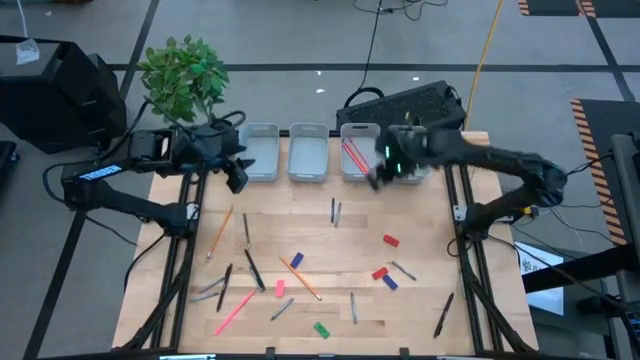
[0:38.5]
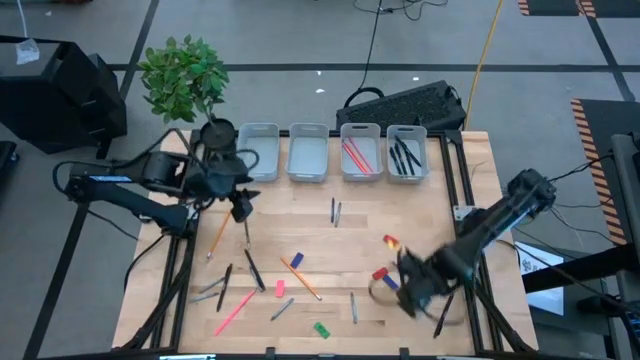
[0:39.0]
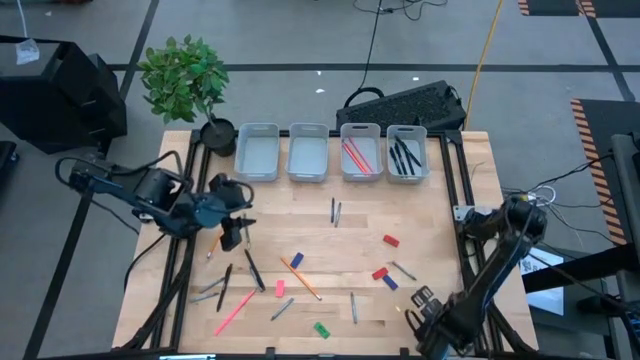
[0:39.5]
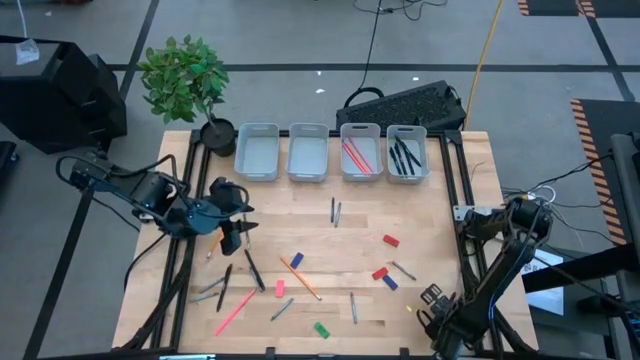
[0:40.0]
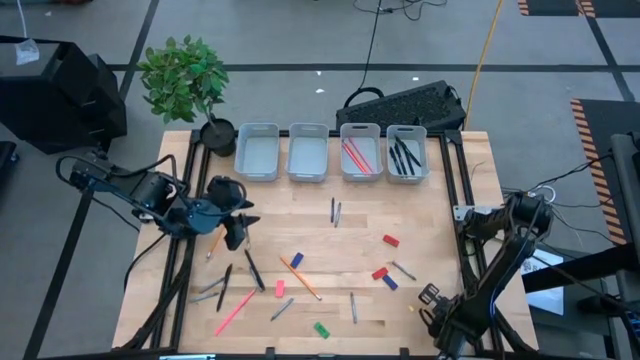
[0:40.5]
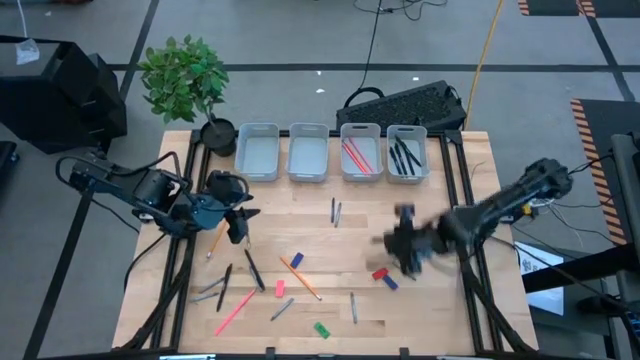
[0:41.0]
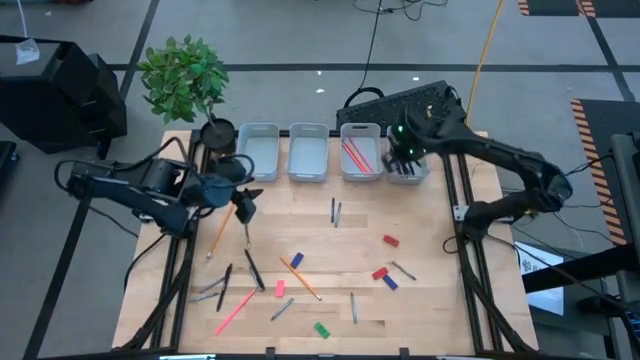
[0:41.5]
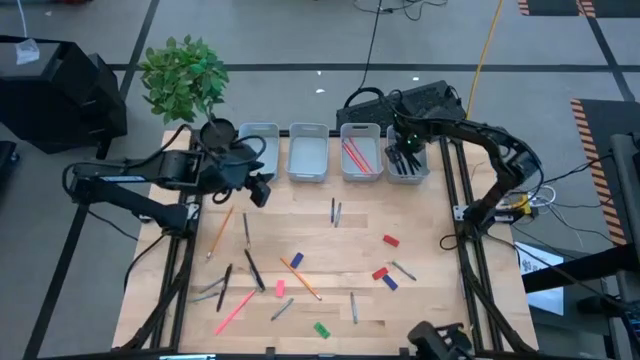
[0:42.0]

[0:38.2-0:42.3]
Task: Sort crayons/erasers/pens/pencils in bins
Put the black pen into the top right gray bin

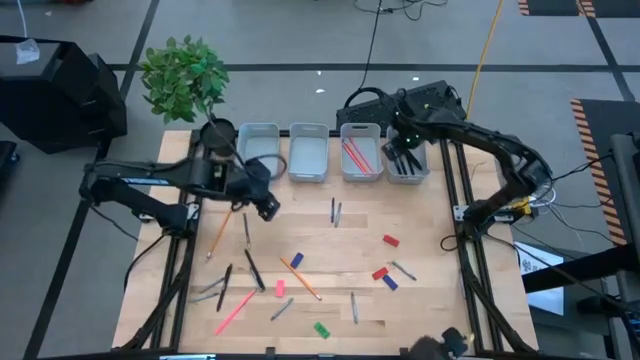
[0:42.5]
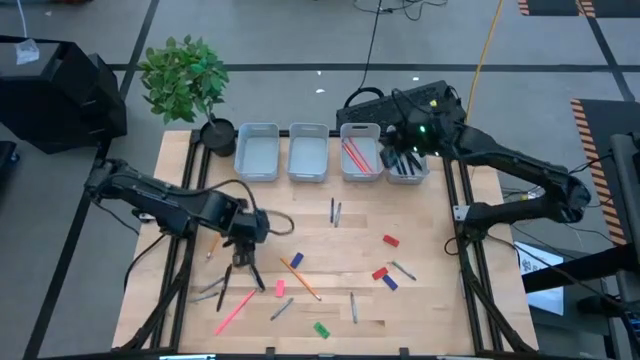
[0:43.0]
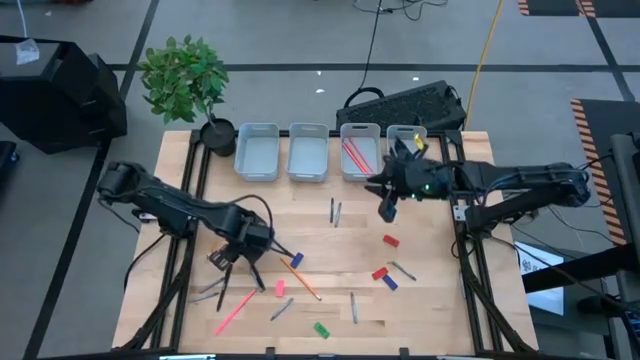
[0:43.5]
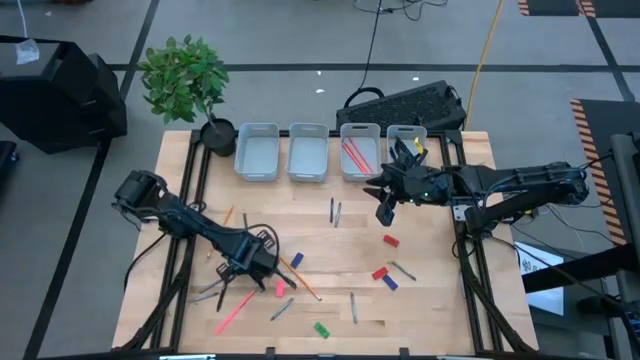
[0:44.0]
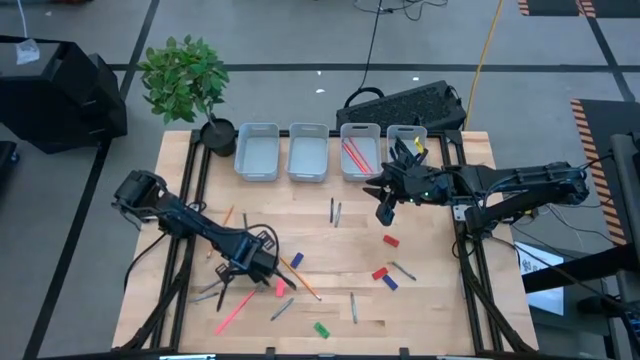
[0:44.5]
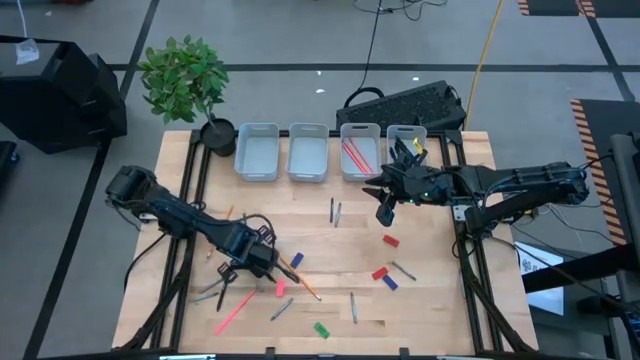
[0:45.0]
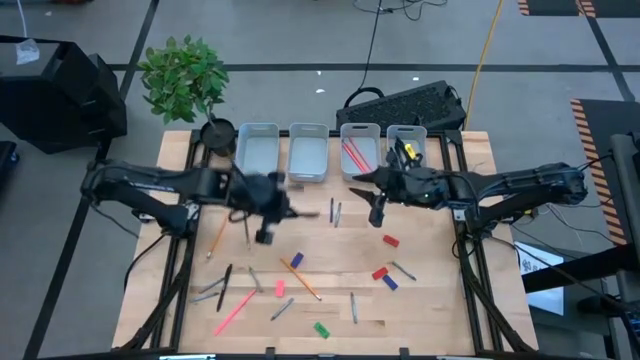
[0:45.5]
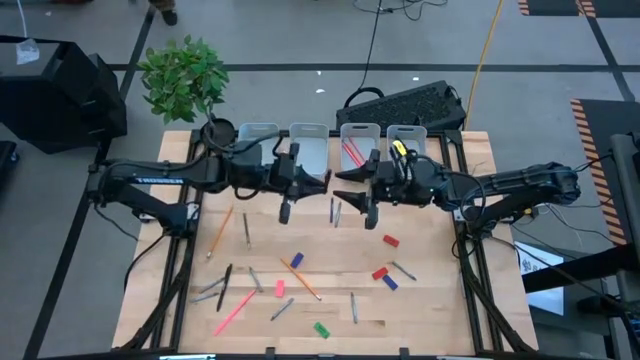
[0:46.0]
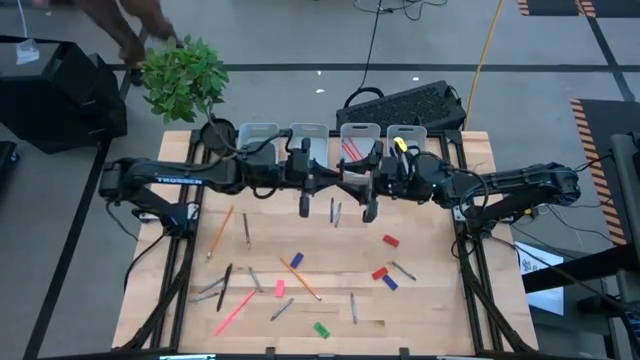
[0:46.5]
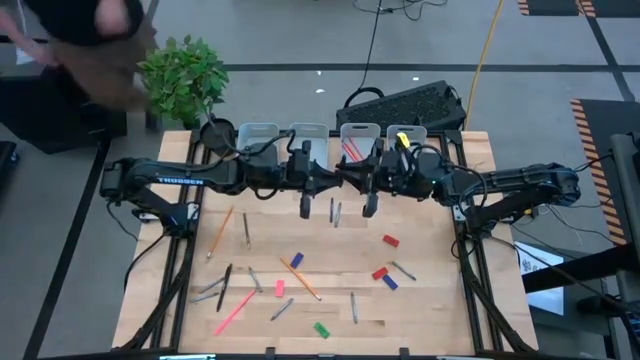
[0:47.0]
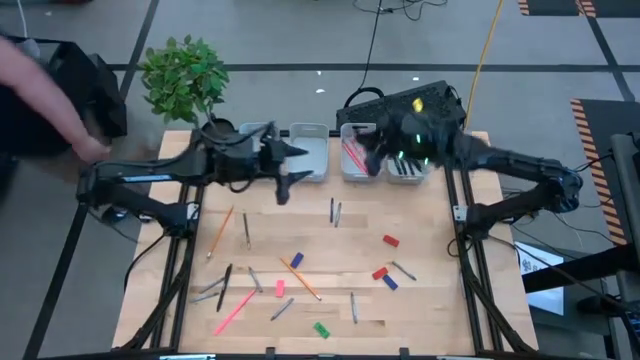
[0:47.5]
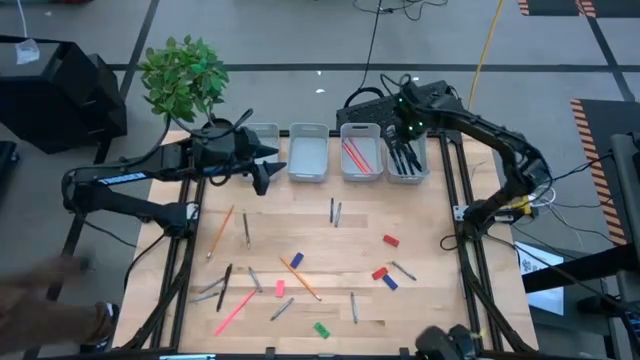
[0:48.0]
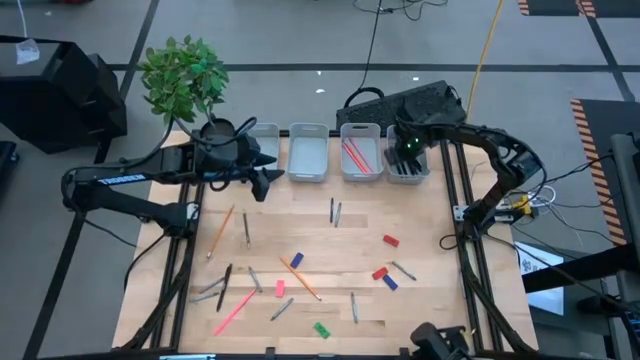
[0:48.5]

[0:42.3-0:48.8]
Put the black pen into the top right gray bin

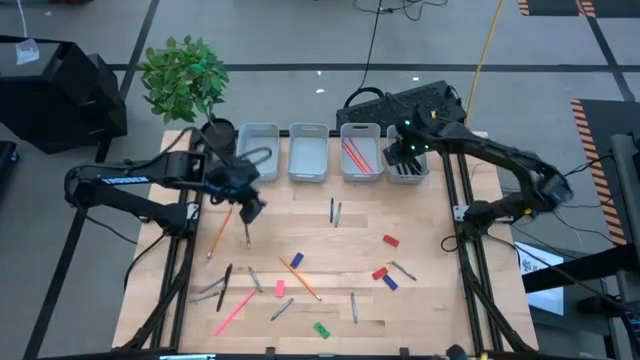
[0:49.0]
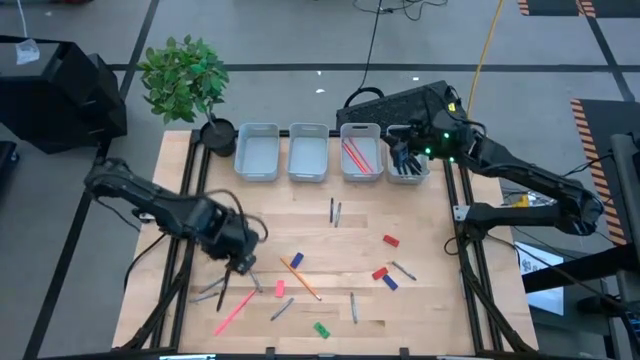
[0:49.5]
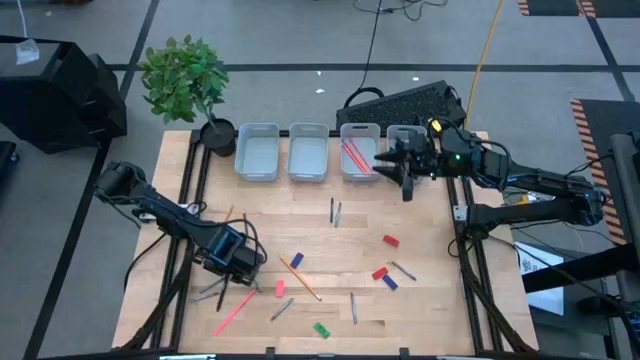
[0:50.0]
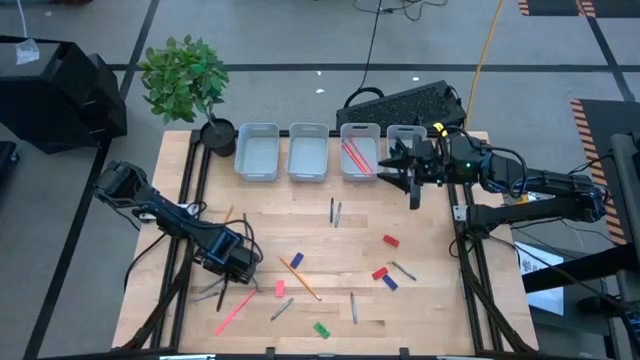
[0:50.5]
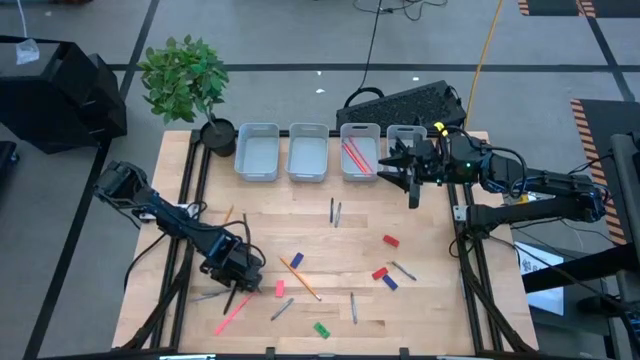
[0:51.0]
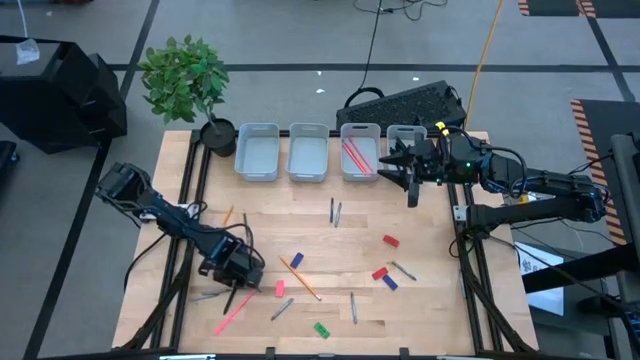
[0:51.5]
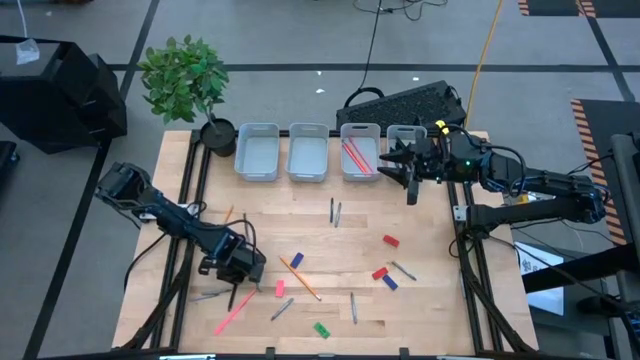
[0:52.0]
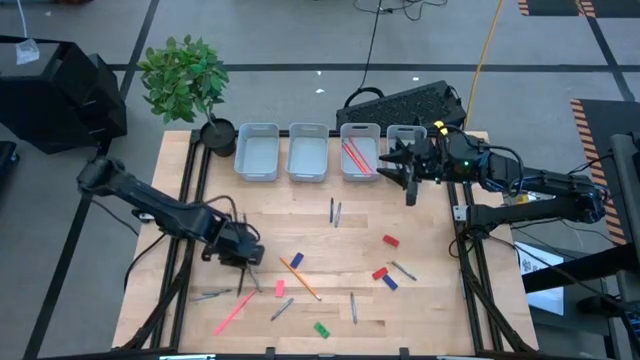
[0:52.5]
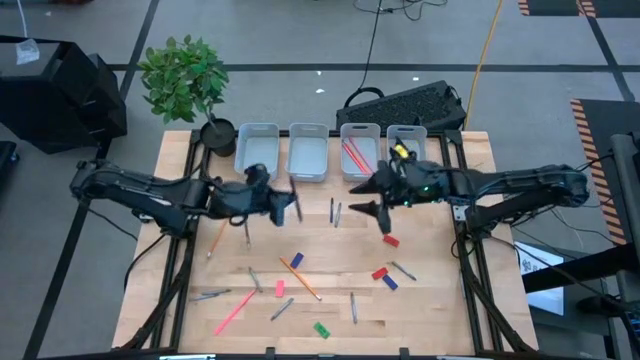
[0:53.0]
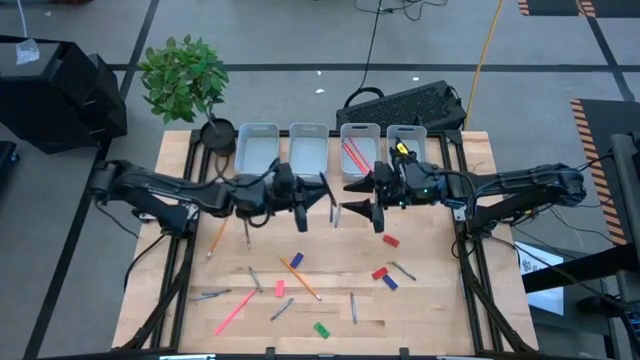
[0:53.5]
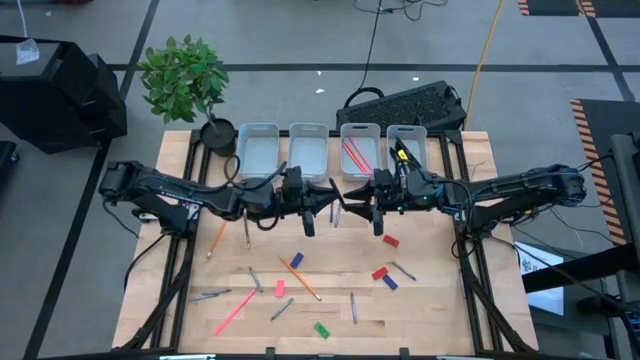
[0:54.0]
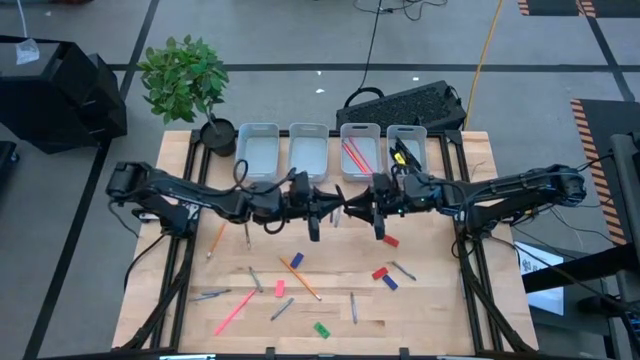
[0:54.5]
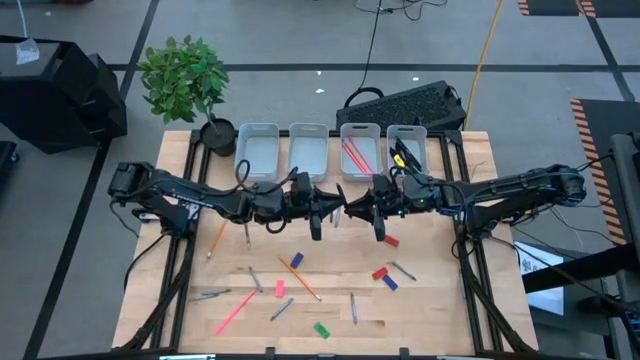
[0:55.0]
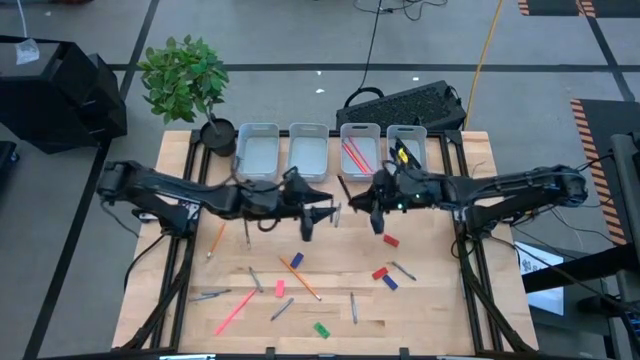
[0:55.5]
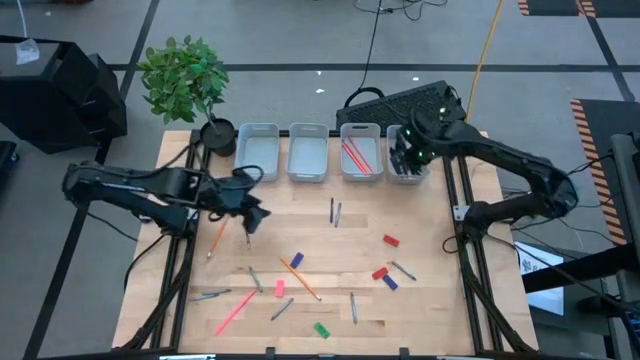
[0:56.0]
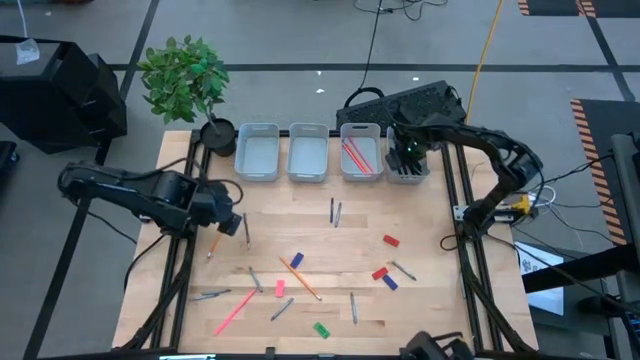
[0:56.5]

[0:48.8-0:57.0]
Put the black pen into the top right gray bin

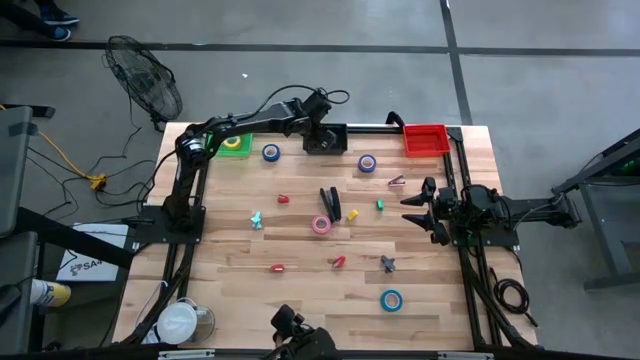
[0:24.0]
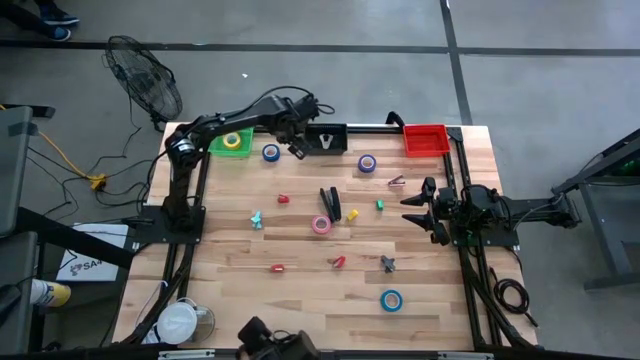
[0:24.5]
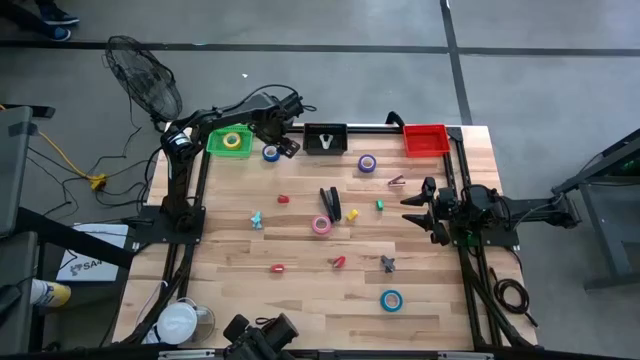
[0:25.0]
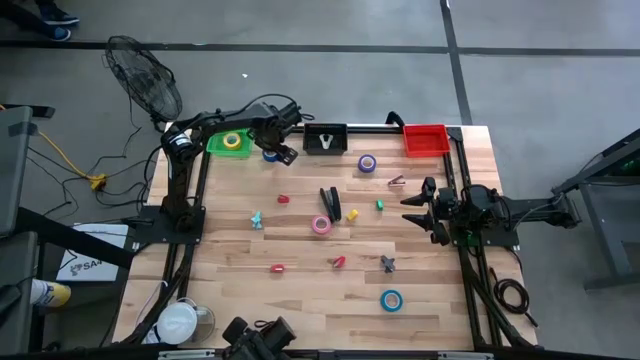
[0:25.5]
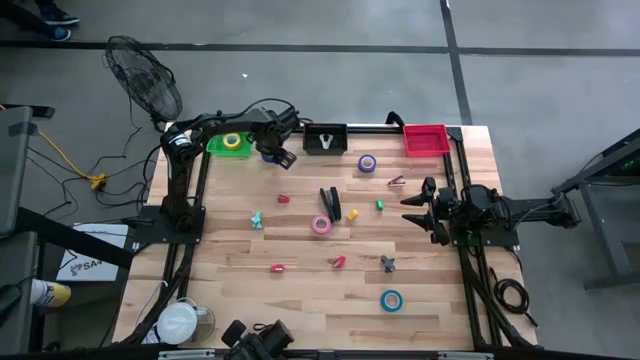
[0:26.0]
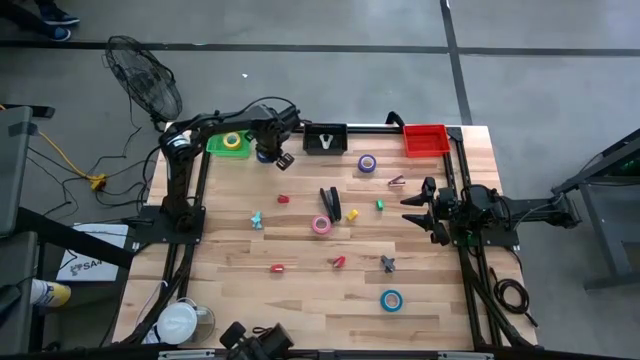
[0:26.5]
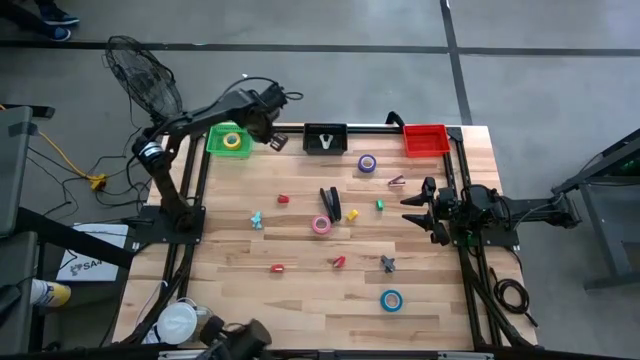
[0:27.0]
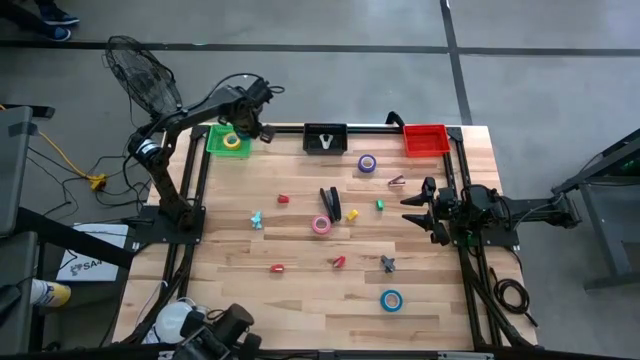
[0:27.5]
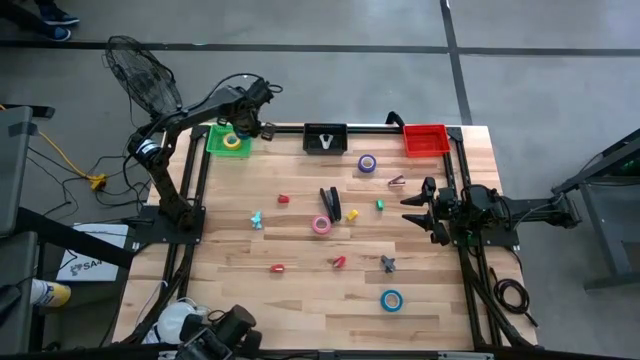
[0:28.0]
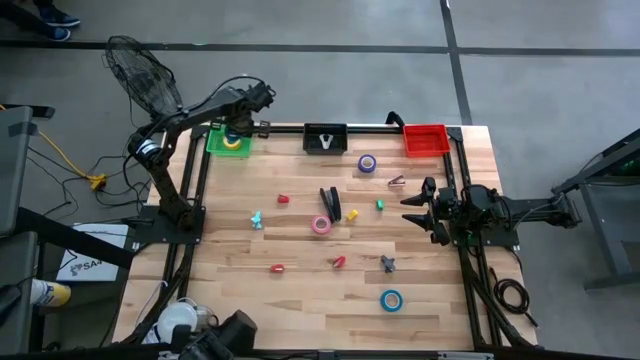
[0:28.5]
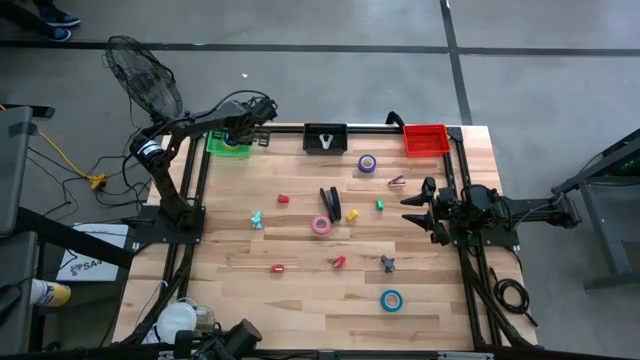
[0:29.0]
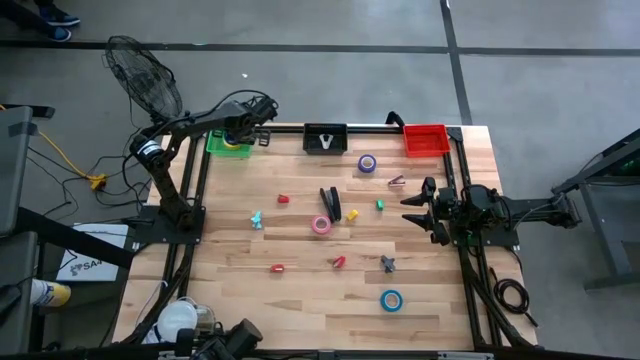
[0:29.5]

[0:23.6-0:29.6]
Task: Pick and place Stapler, Stapler remover, tape
Put the blue tape in the green bin
